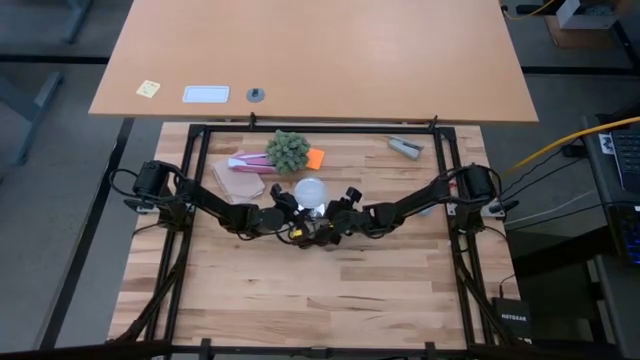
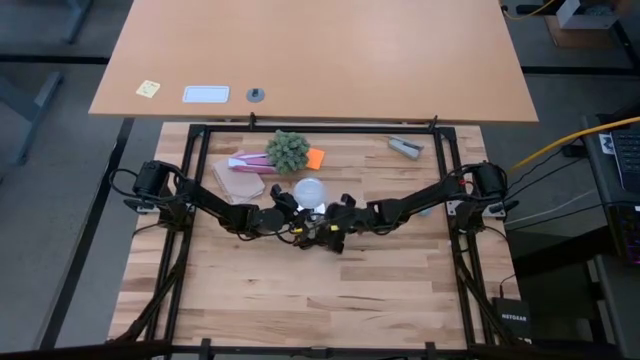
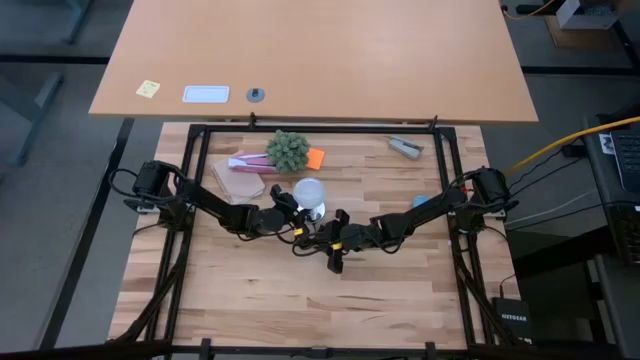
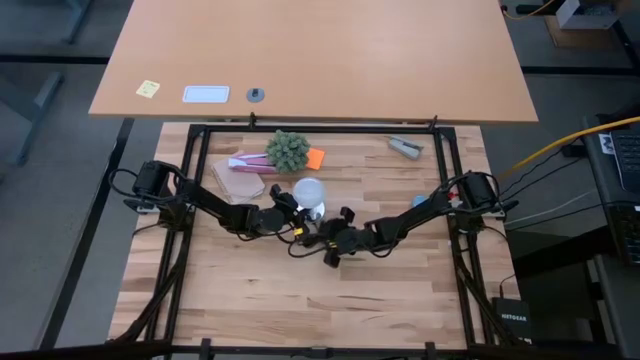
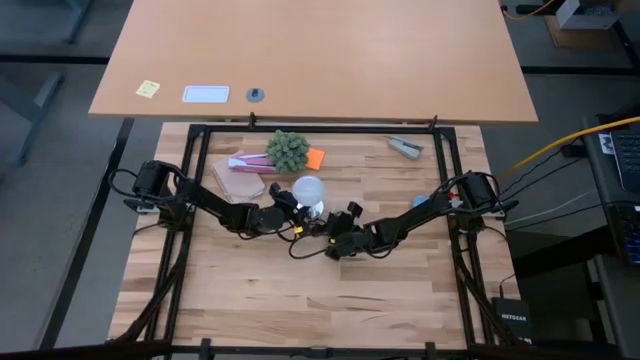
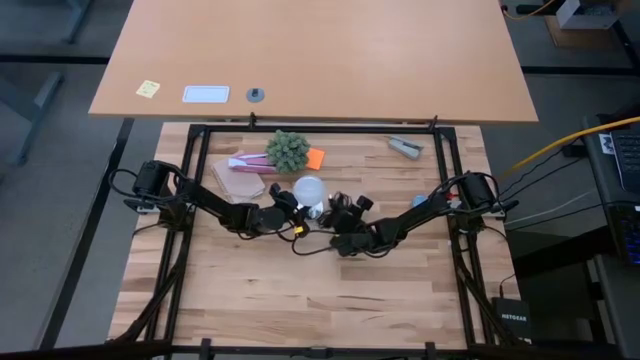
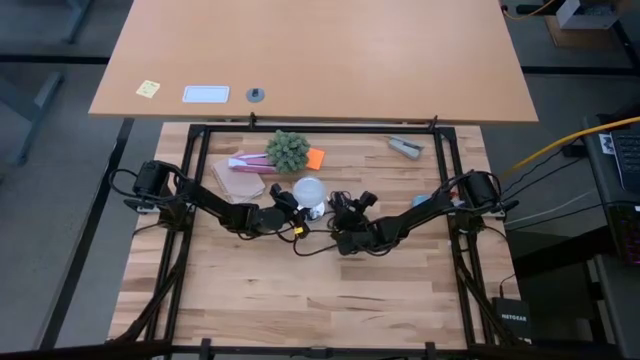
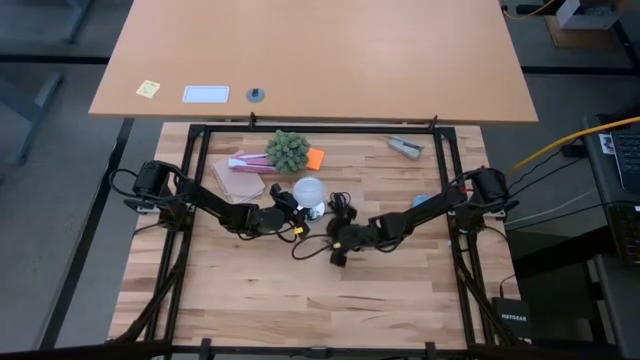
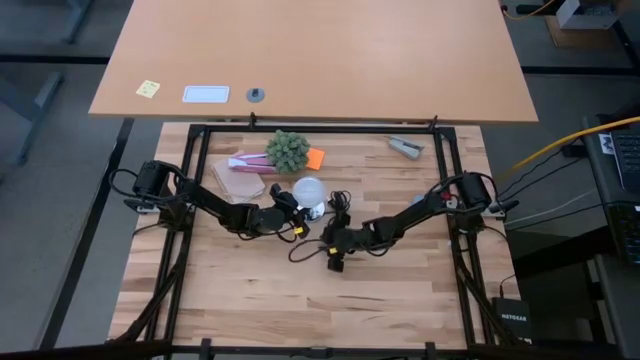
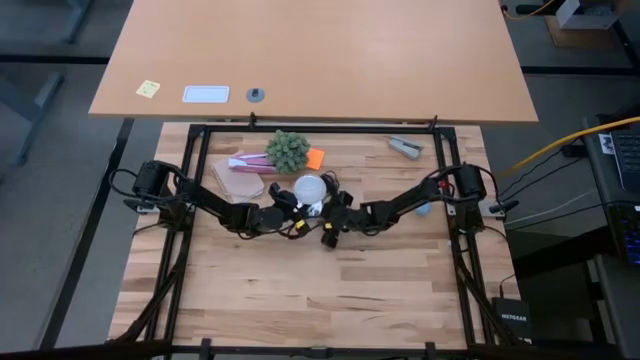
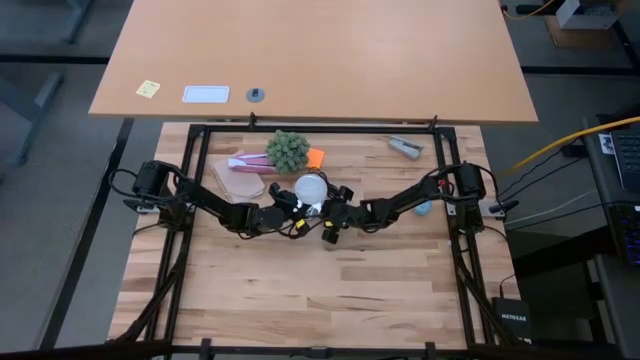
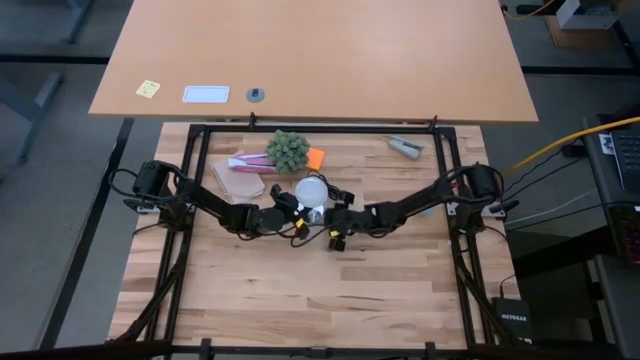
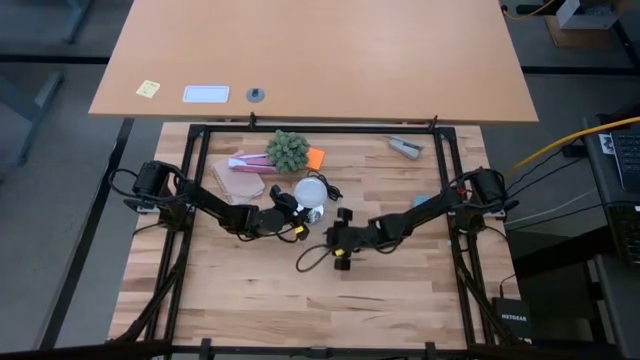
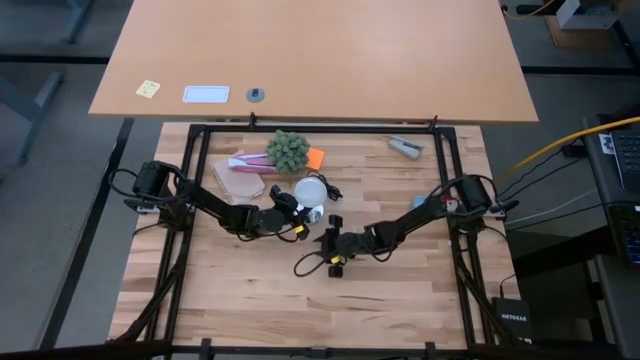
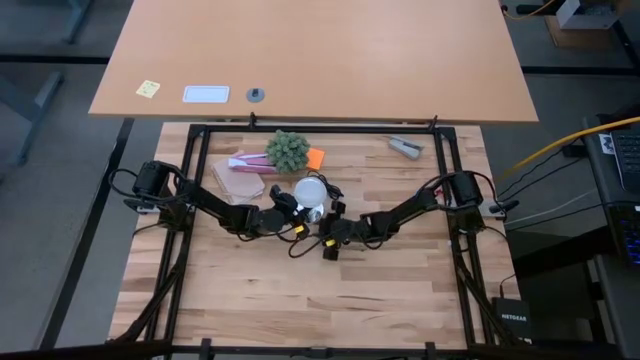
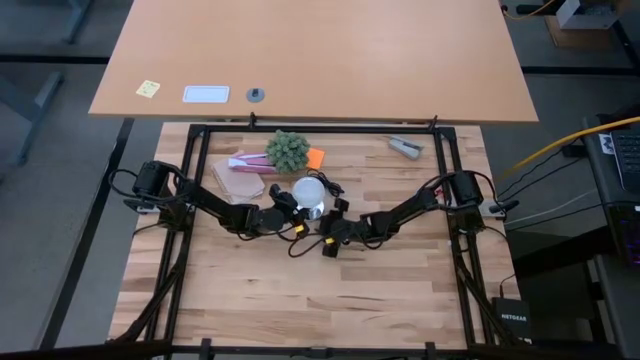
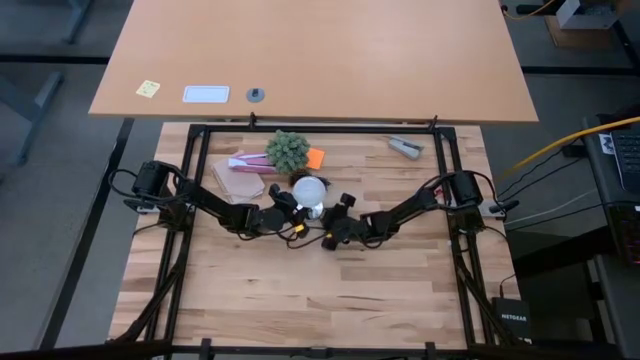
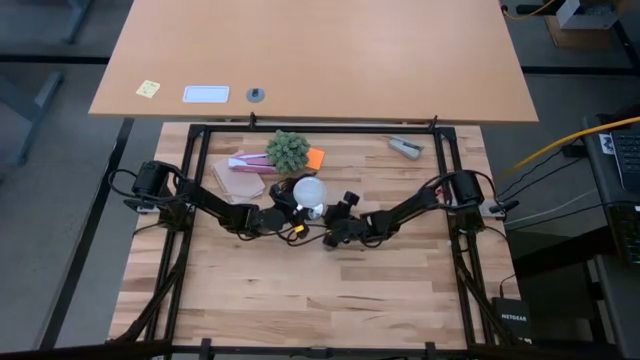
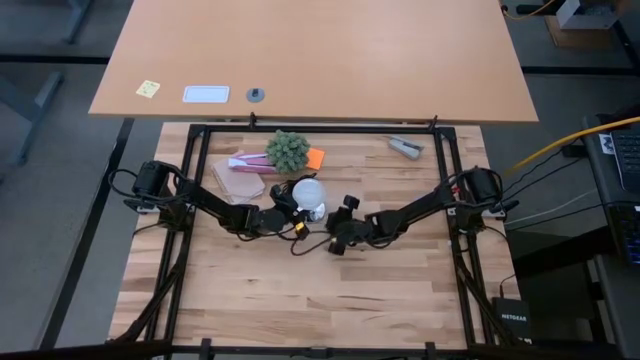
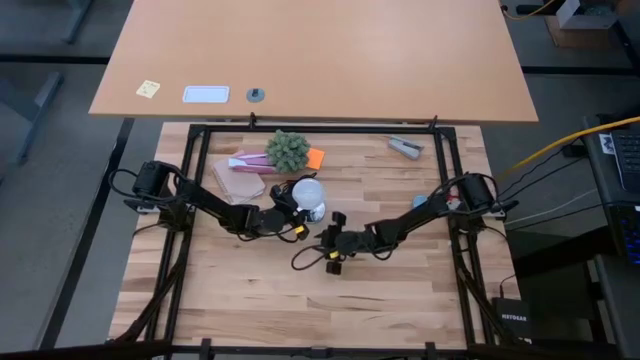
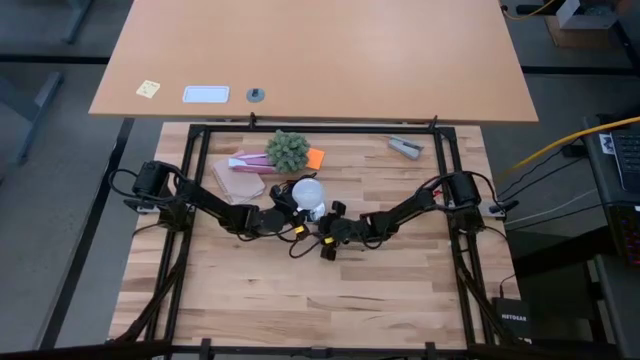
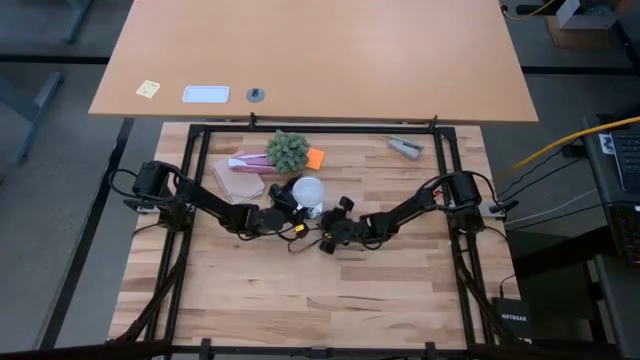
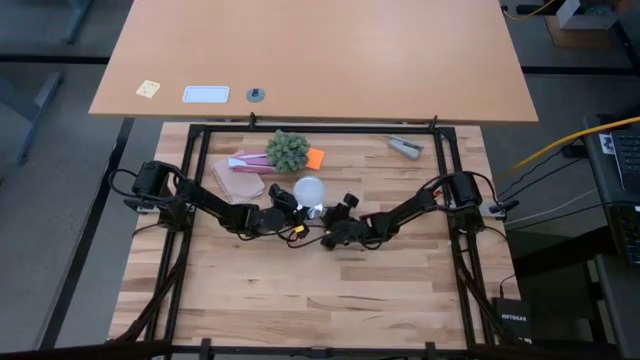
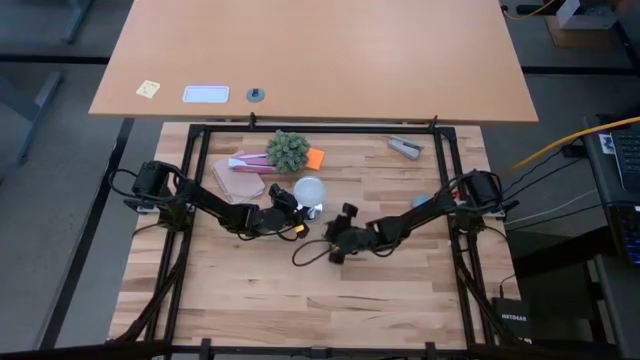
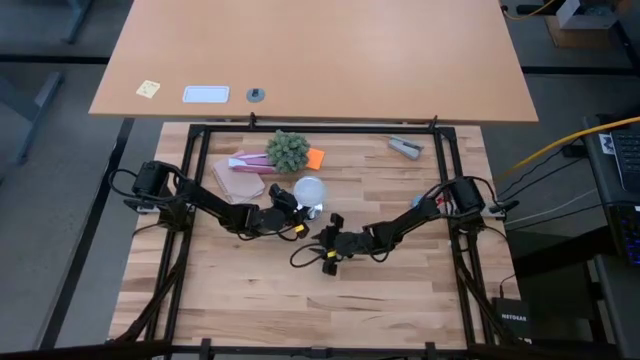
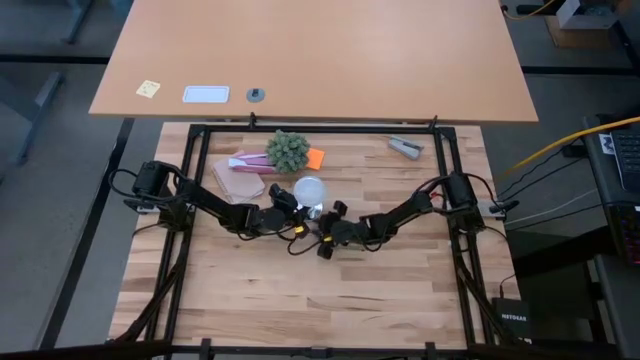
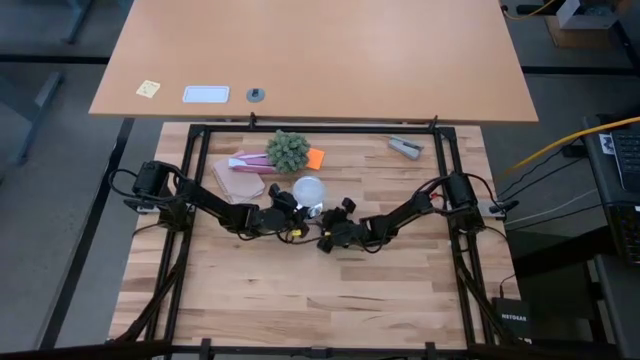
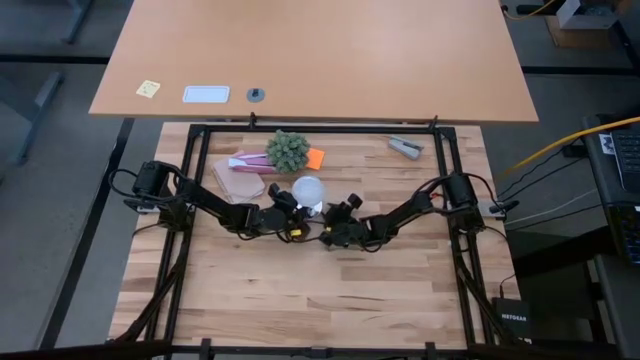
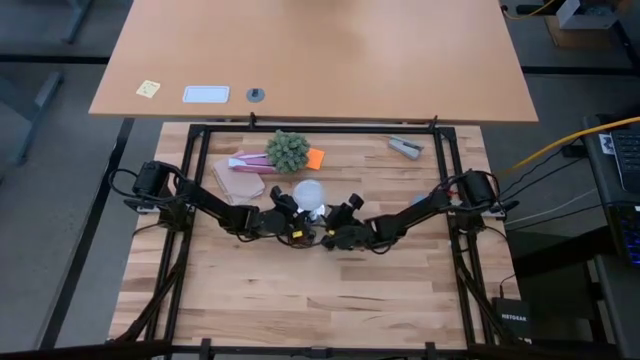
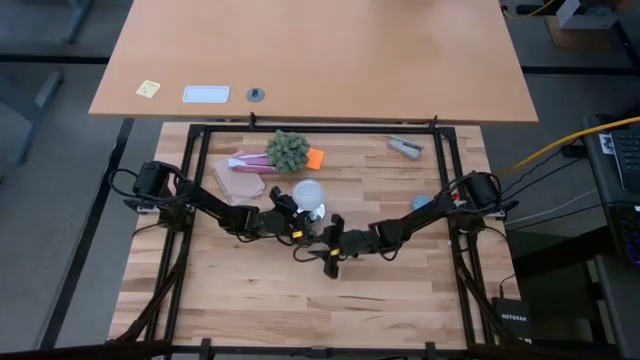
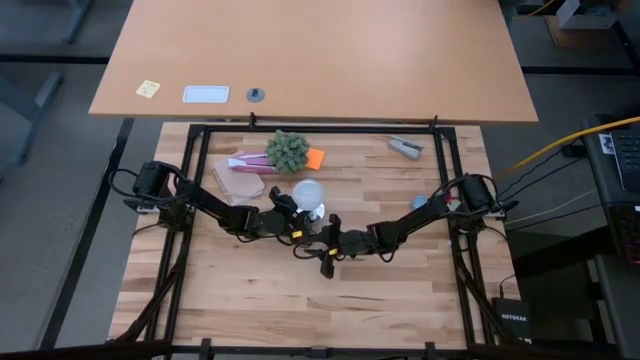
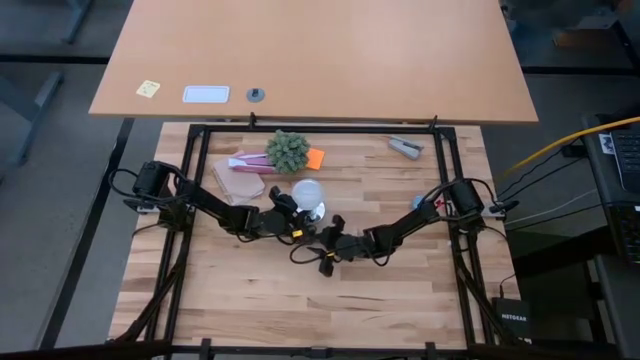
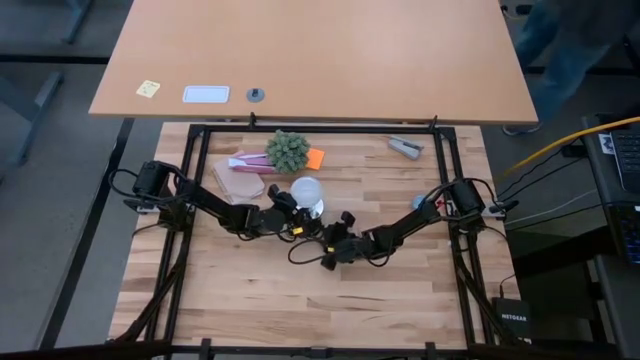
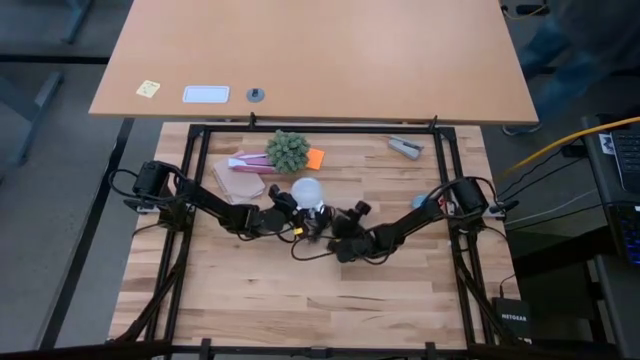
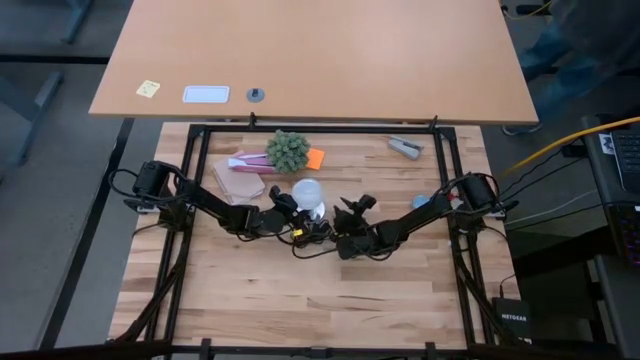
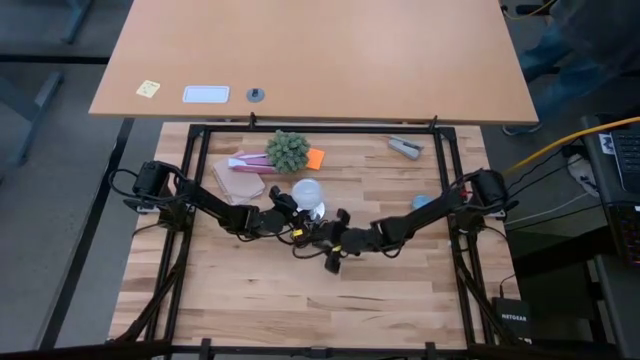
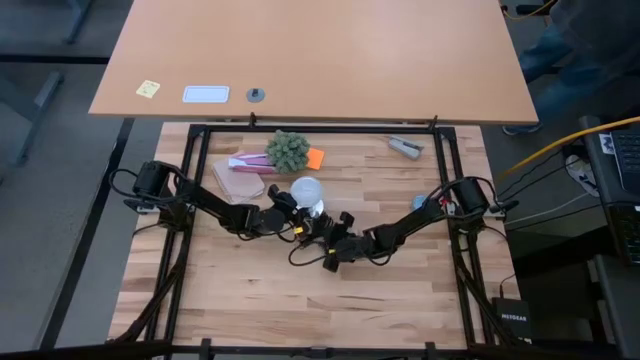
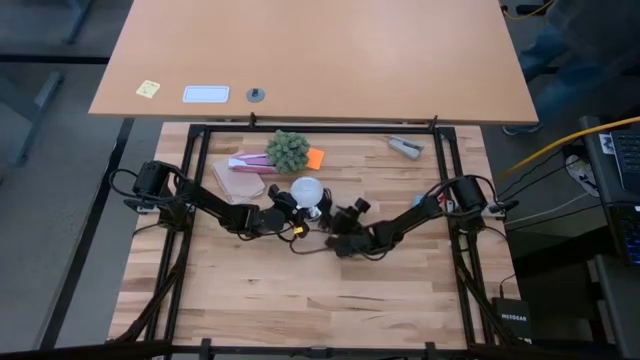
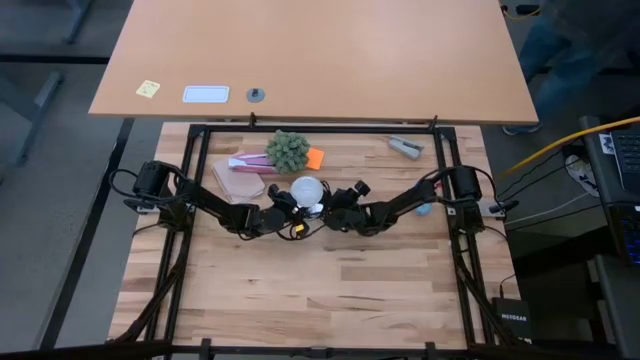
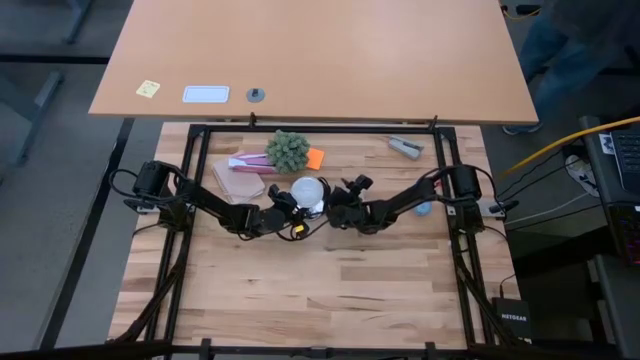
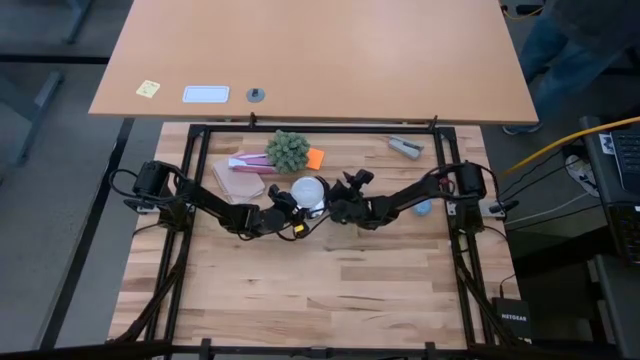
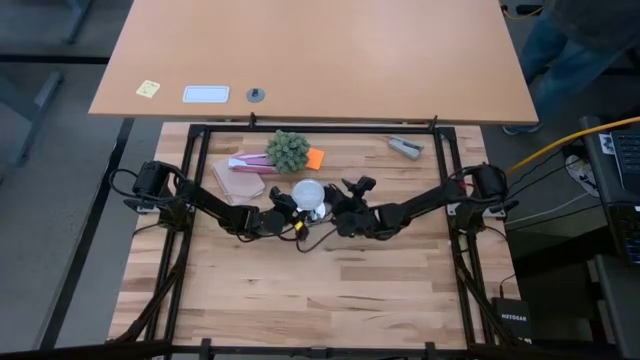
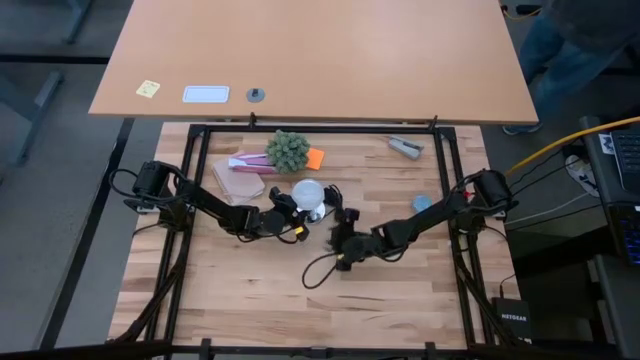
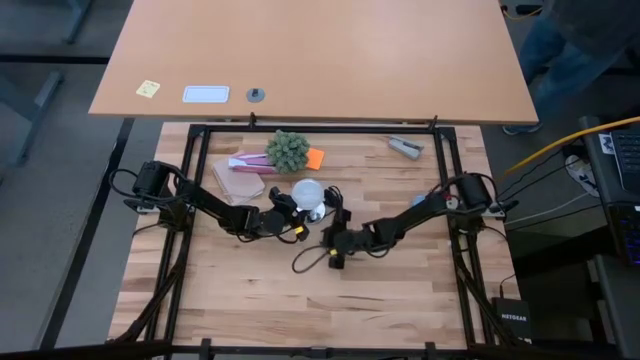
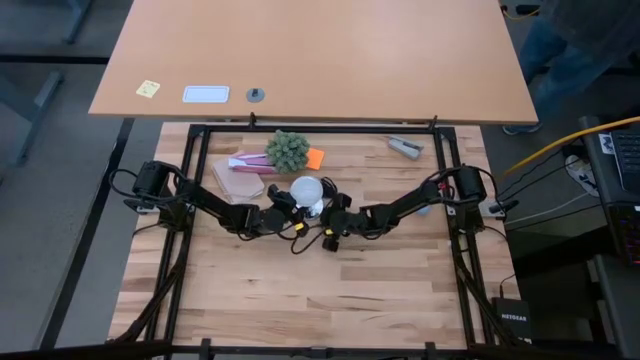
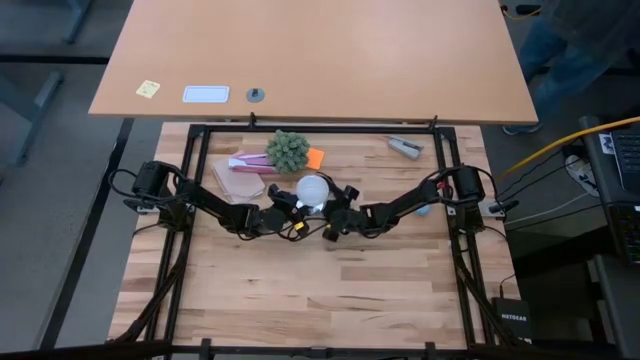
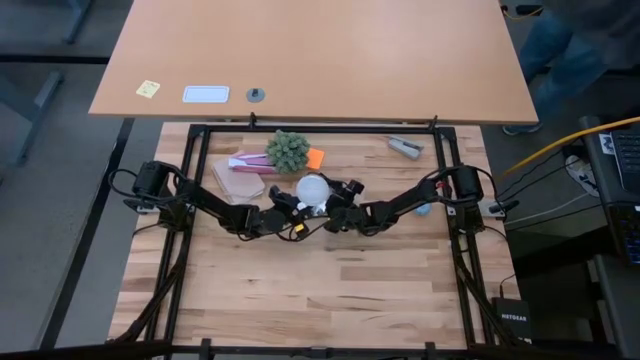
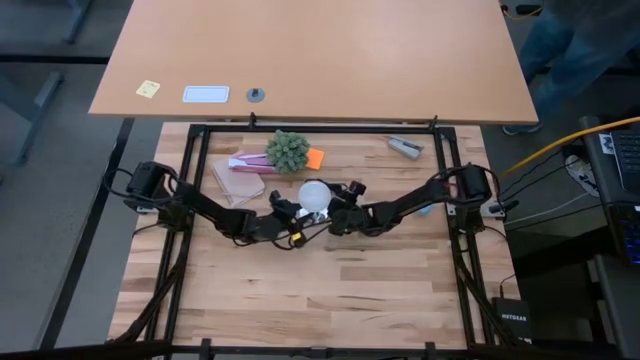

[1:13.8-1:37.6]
Task: Screw lightbulb
Insert the lightbulb into the lamp
